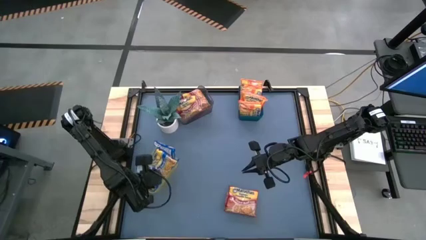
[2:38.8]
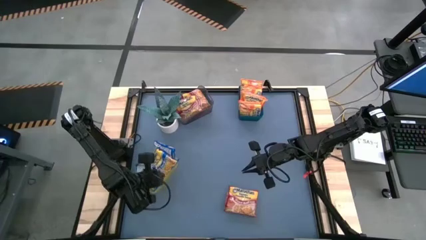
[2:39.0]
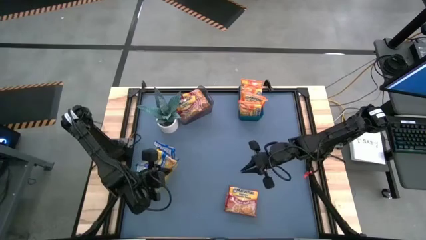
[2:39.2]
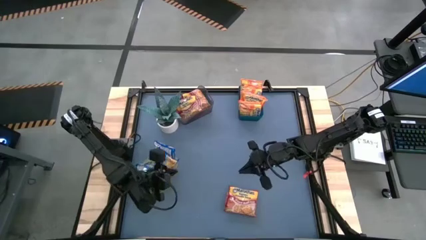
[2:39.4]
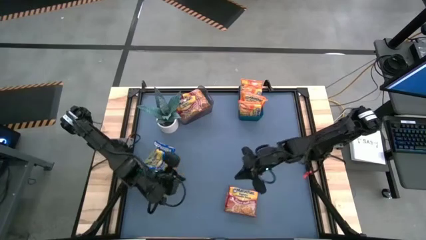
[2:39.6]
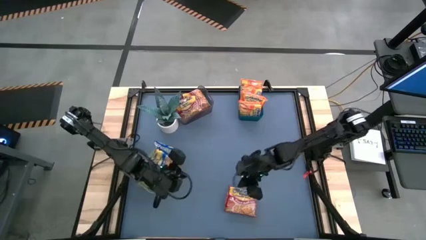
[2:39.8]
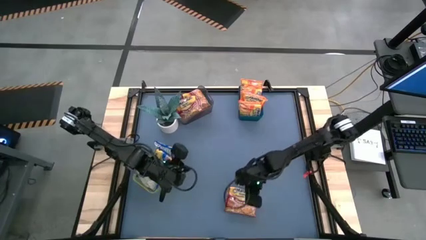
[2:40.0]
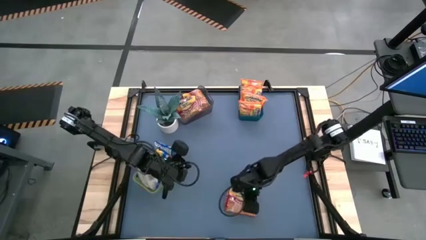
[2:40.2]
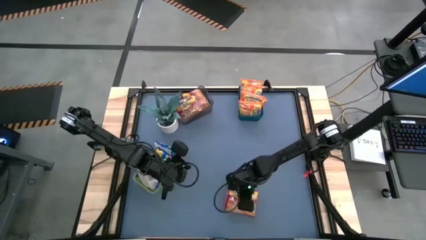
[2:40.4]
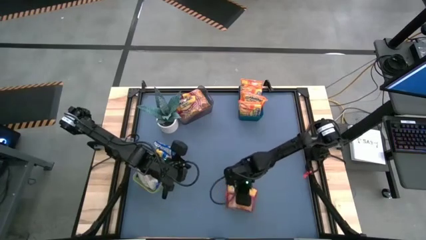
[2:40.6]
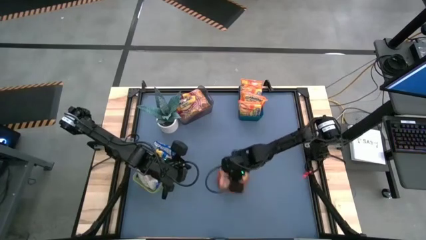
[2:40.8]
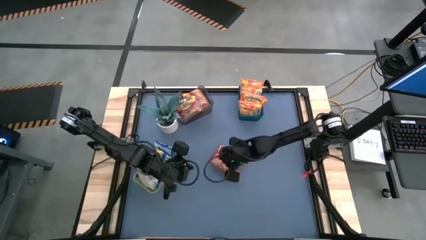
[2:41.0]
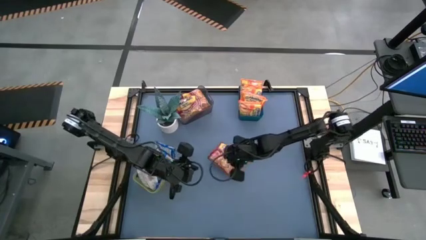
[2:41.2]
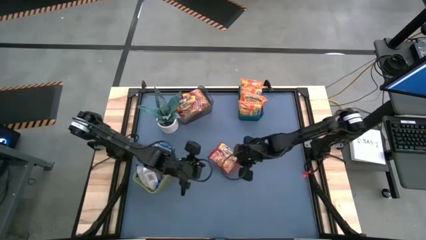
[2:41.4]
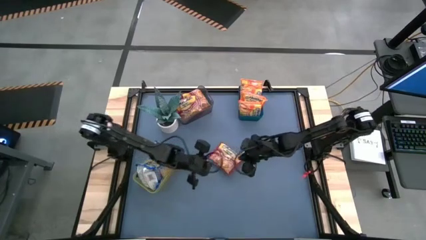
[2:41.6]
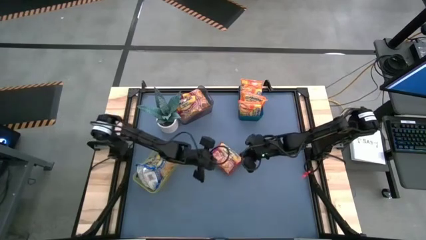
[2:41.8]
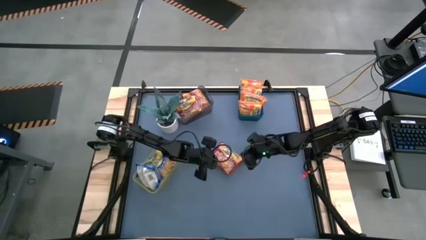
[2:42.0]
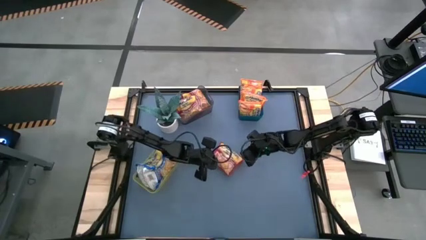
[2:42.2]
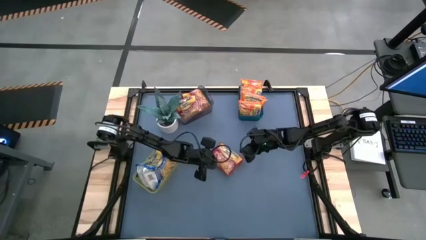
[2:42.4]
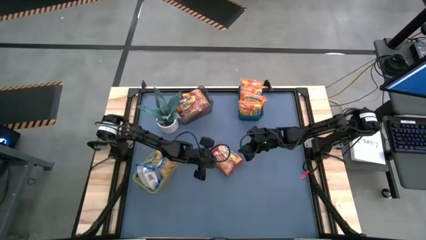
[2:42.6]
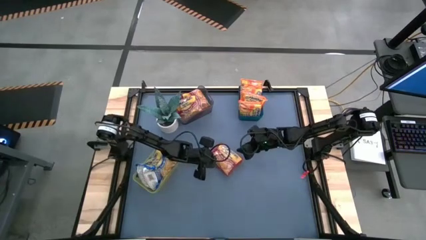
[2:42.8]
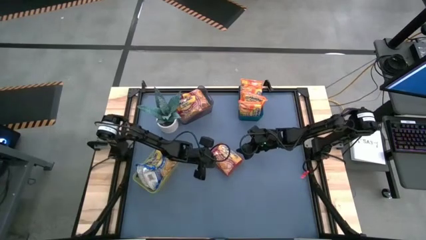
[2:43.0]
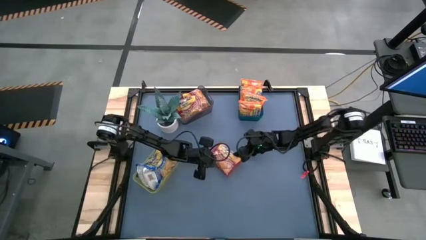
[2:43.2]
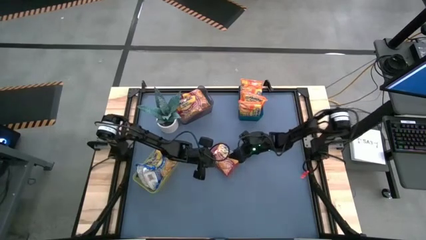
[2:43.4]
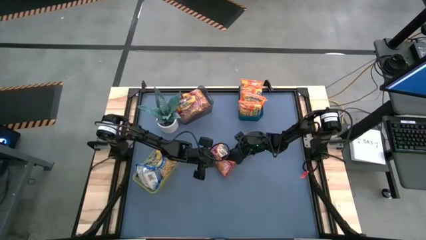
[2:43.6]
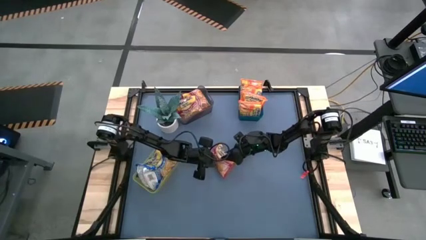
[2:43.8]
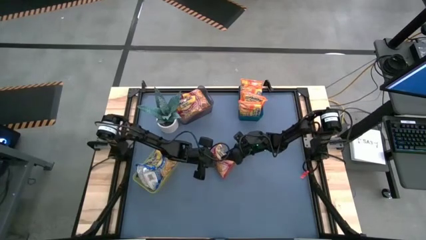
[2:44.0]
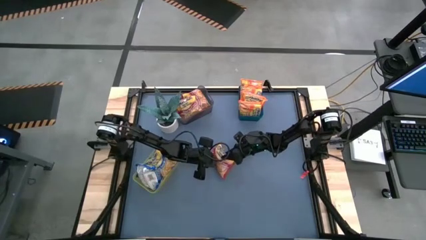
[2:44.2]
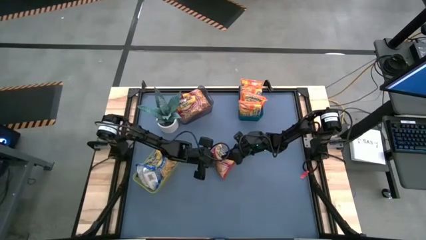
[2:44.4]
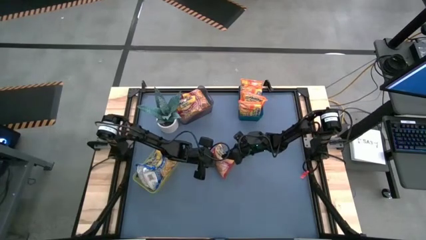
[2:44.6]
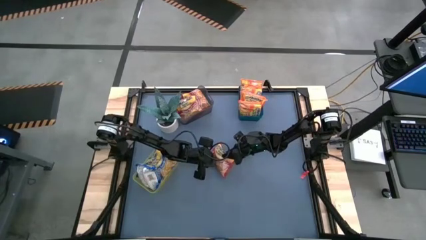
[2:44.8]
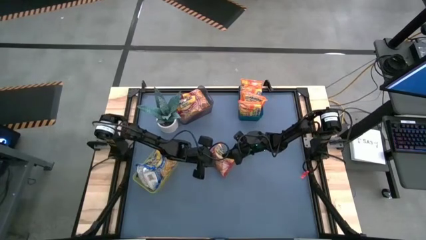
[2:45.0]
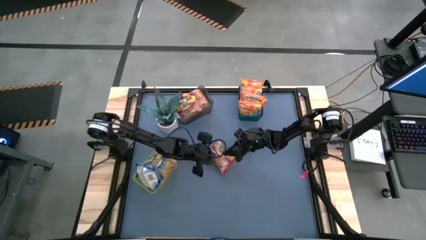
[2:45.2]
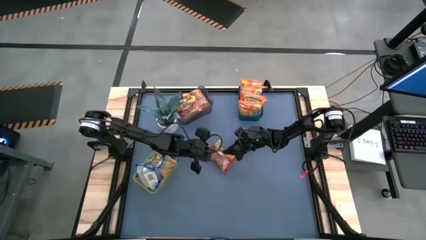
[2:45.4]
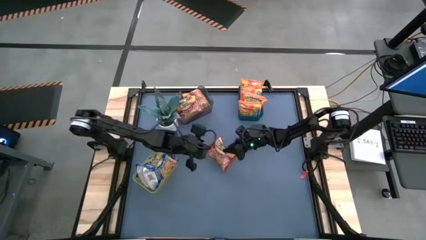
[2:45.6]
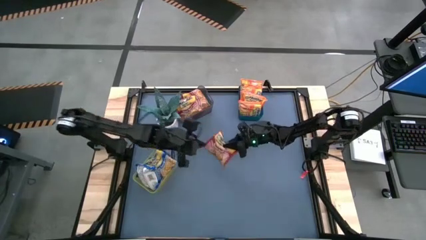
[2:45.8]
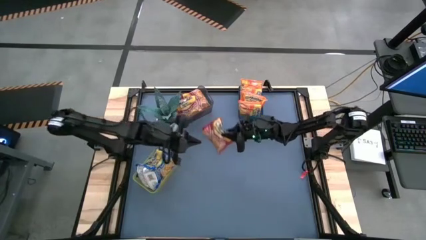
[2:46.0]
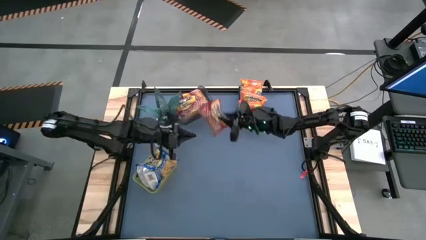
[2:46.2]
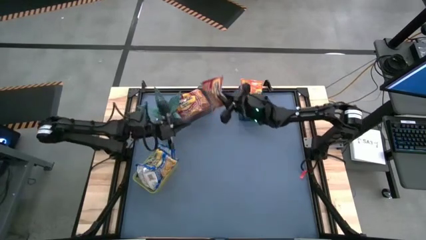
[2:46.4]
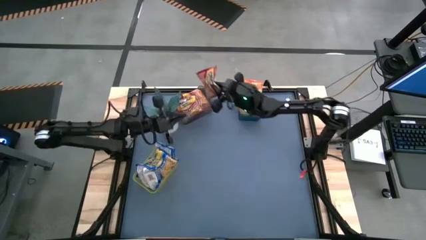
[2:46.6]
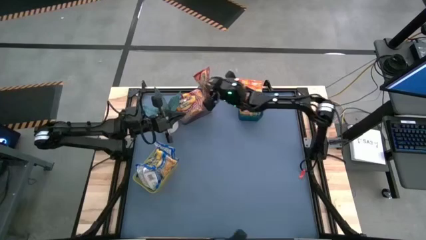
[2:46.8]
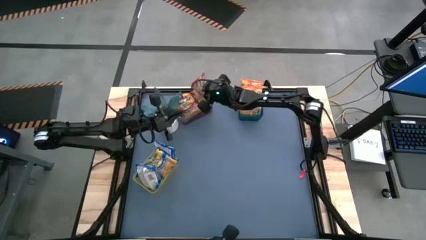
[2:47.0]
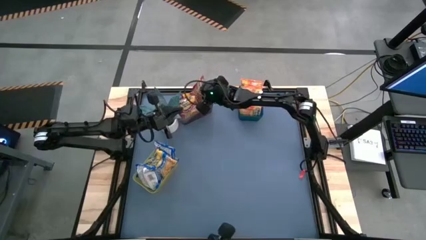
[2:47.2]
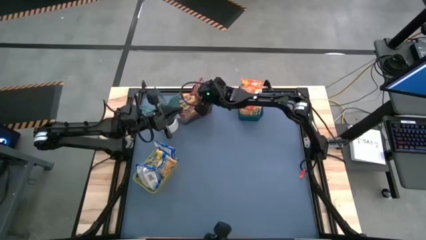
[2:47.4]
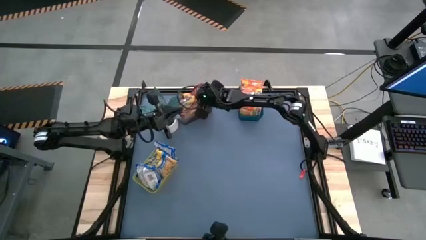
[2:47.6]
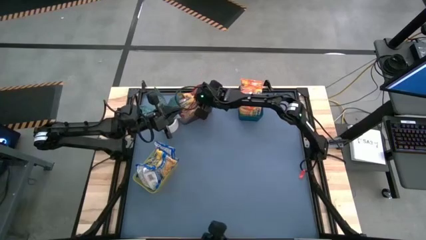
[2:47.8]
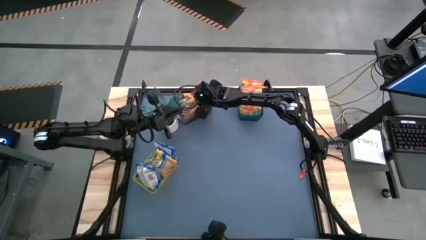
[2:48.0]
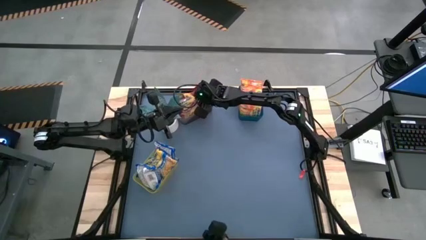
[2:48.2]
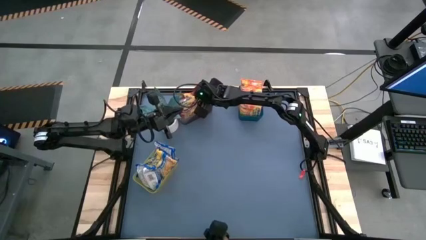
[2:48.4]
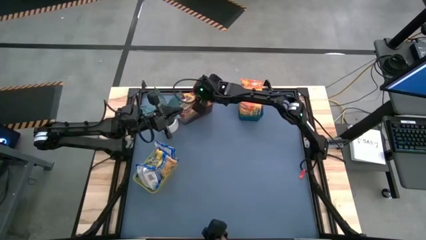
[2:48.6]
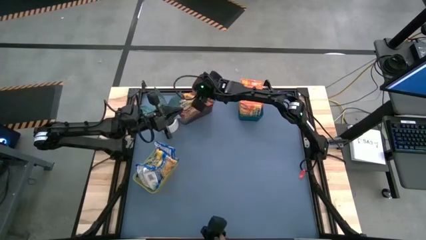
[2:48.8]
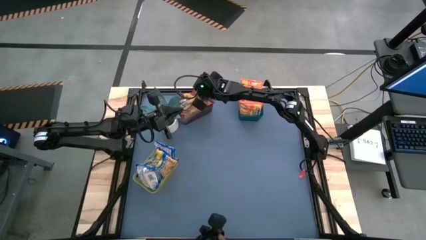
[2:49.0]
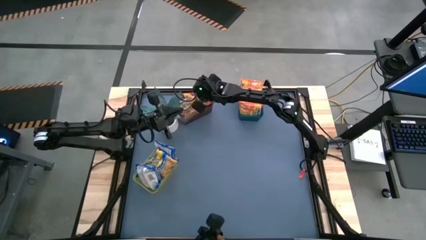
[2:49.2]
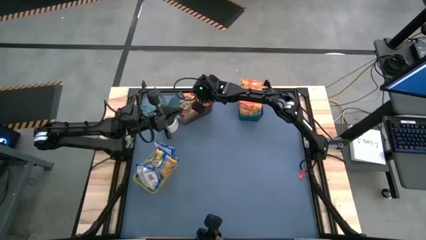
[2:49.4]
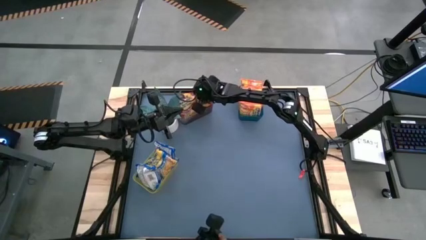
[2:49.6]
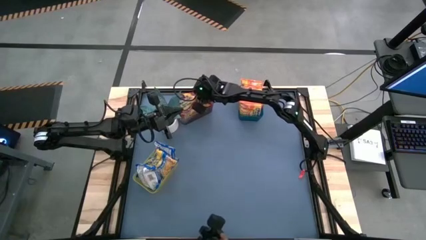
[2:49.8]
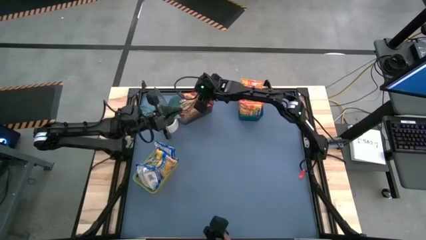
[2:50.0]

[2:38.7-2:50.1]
Task: Sort Maruchan noodles
Put the red noodle pack into the black bin

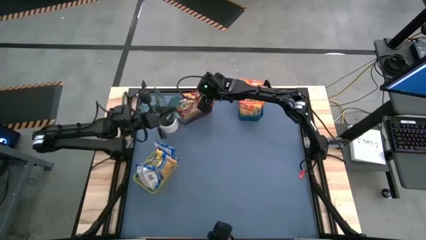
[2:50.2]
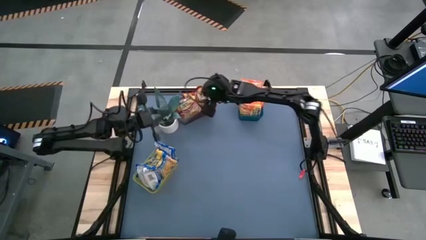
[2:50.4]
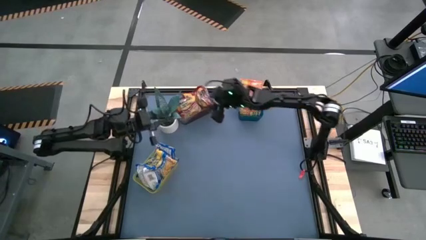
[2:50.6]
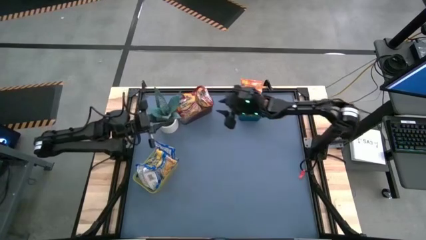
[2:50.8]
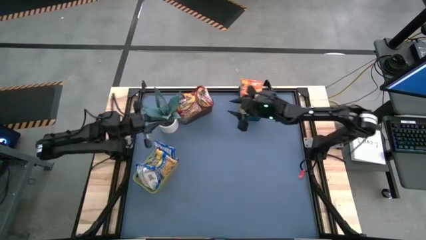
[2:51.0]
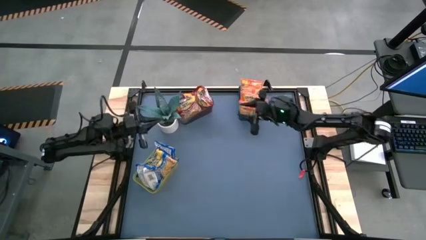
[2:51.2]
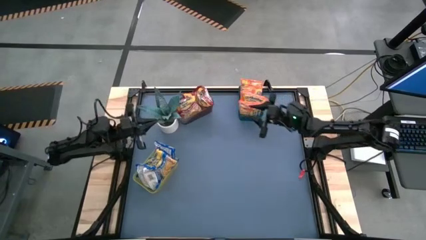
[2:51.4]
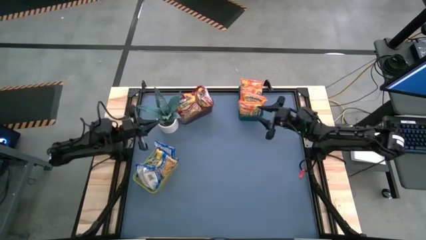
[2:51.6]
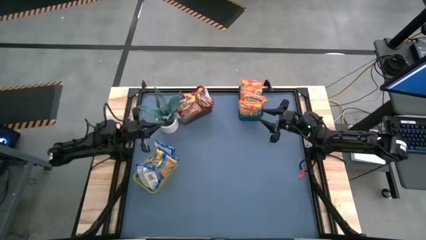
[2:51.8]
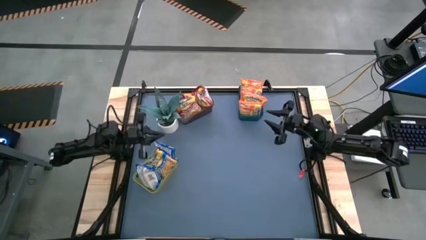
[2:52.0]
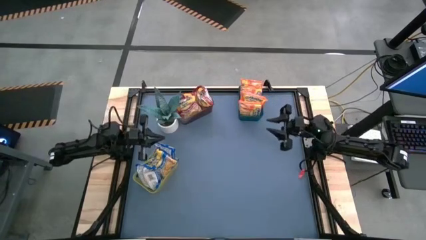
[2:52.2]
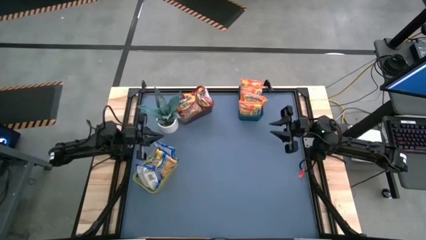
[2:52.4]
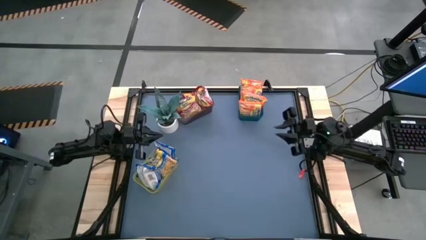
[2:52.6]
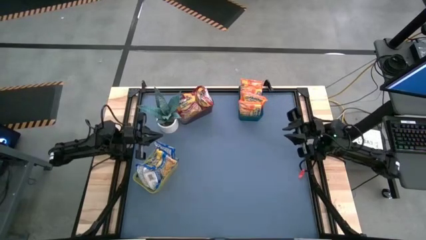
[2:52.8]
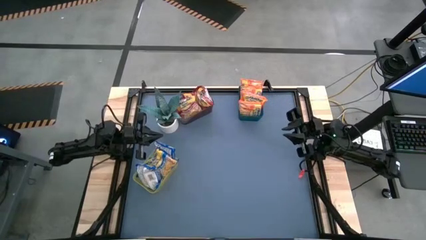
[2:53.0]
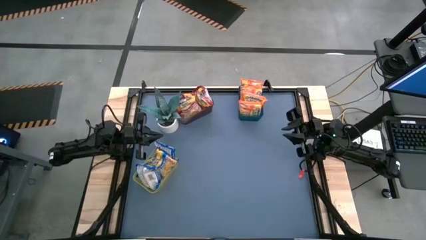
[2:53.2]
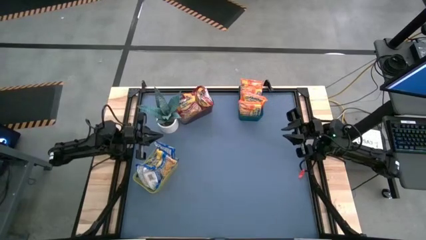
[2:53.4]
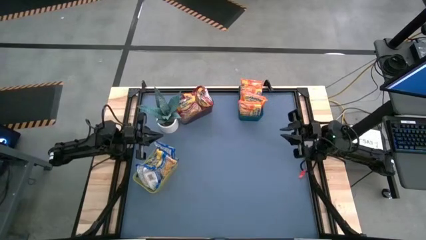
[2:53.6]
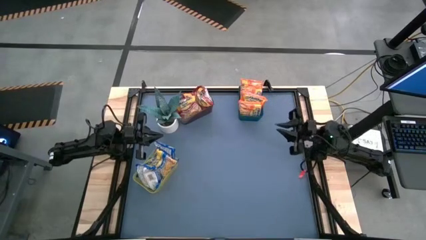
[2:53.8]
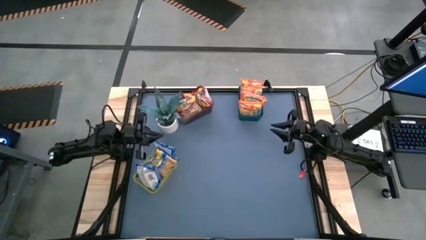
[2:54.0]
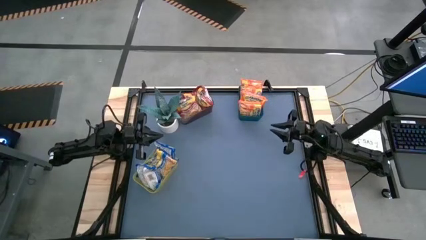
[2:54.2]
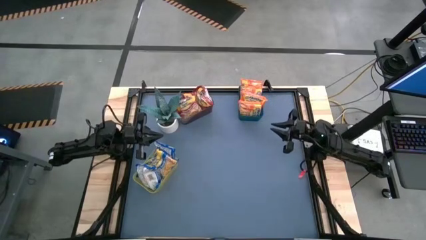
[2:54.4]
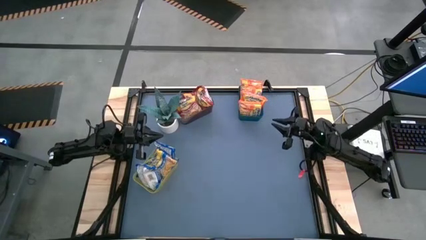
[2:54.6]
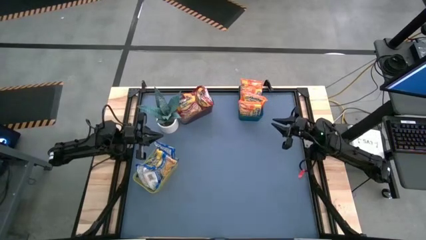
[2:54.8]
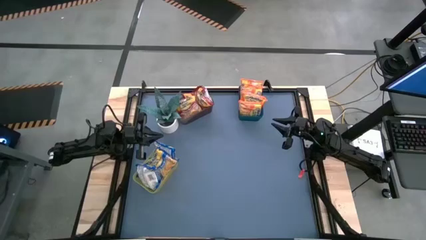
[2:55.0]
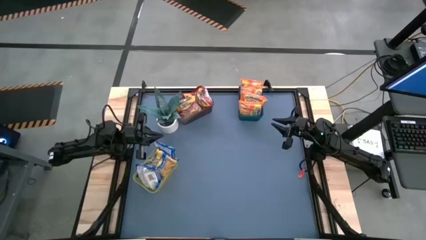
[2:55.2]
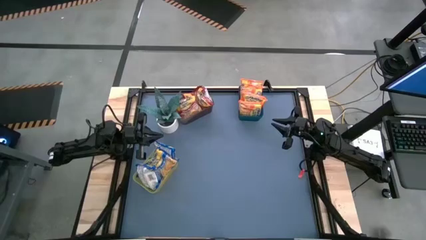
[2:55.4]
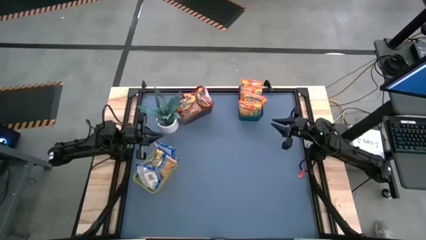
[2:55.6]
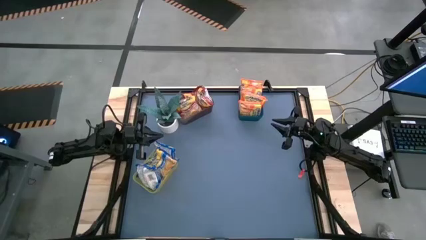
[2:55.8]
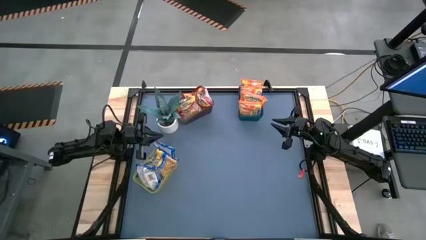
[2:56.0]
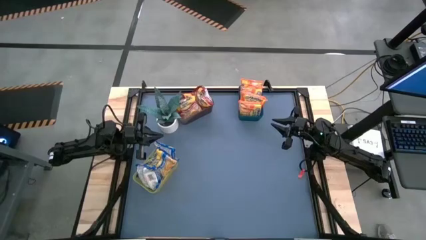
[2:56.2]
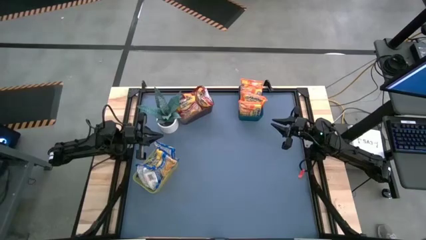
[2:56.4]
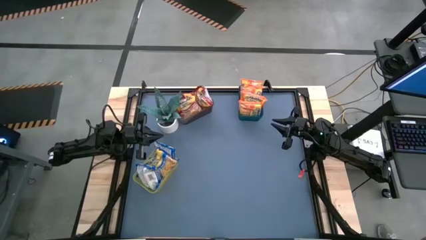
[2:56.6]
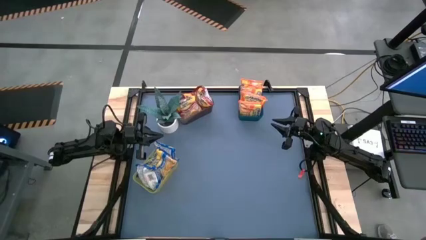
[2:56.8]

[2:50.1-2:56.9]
Return to Home Position
